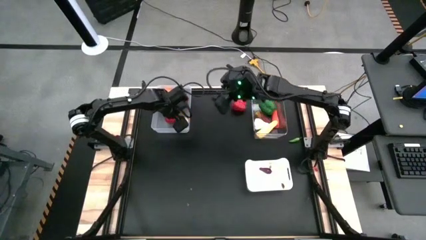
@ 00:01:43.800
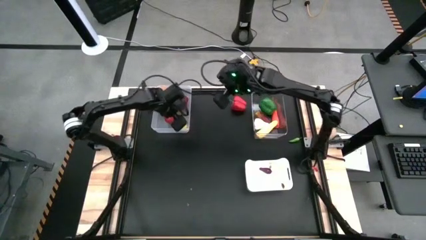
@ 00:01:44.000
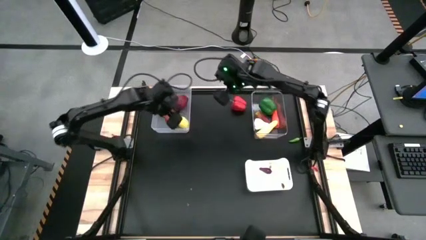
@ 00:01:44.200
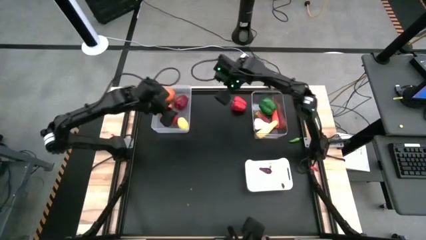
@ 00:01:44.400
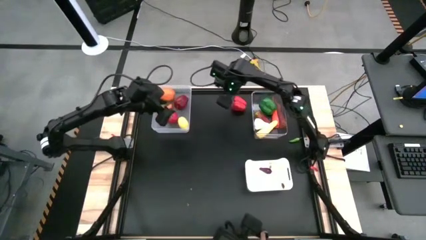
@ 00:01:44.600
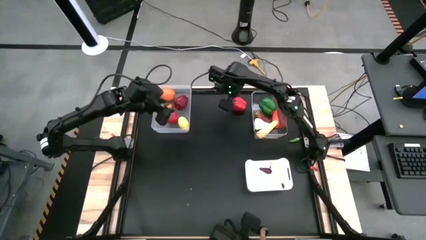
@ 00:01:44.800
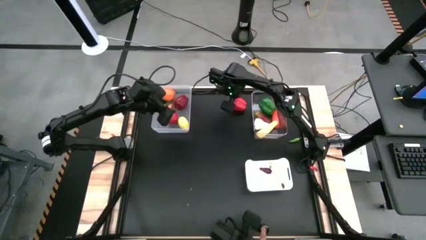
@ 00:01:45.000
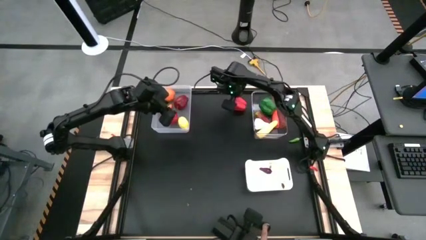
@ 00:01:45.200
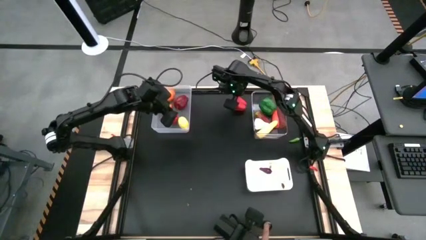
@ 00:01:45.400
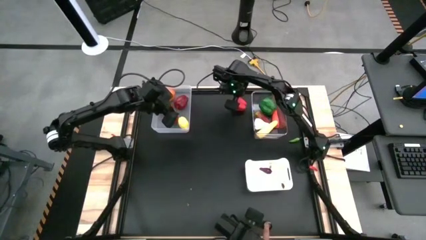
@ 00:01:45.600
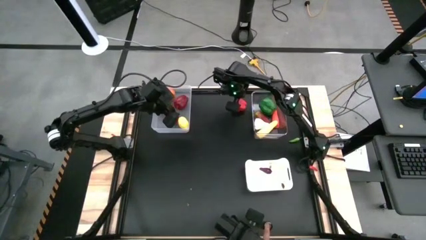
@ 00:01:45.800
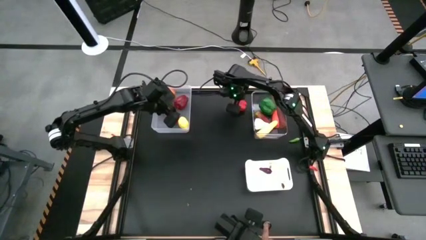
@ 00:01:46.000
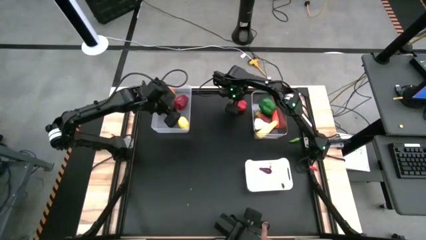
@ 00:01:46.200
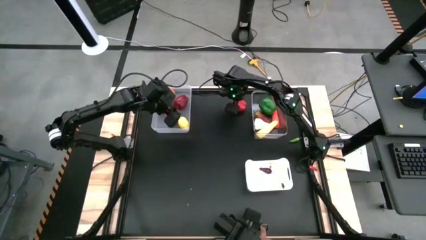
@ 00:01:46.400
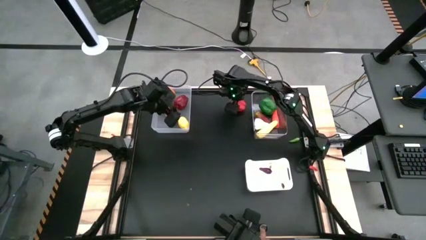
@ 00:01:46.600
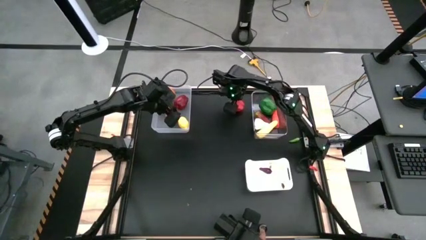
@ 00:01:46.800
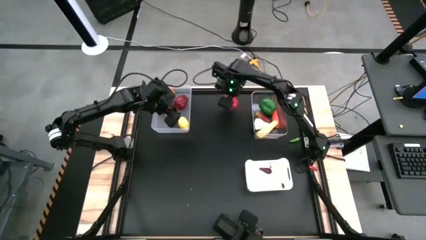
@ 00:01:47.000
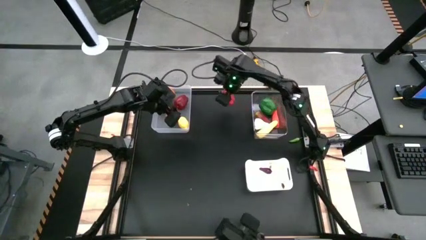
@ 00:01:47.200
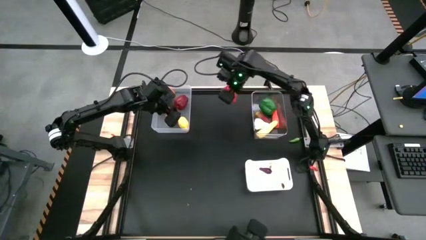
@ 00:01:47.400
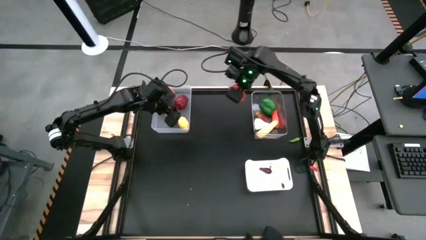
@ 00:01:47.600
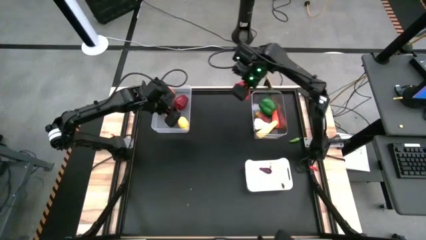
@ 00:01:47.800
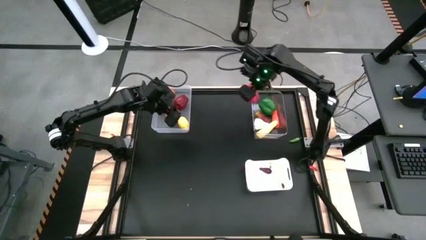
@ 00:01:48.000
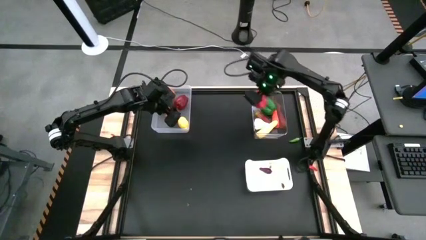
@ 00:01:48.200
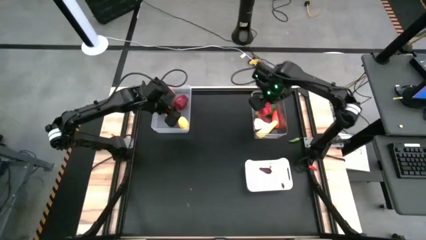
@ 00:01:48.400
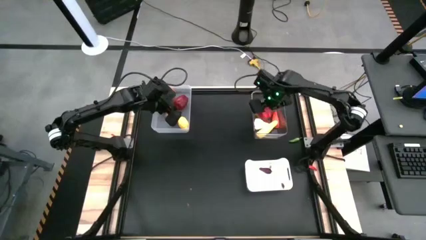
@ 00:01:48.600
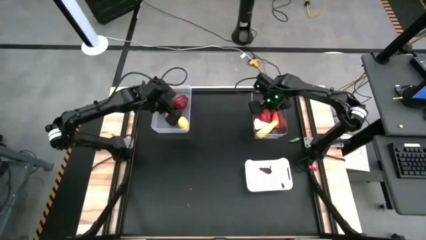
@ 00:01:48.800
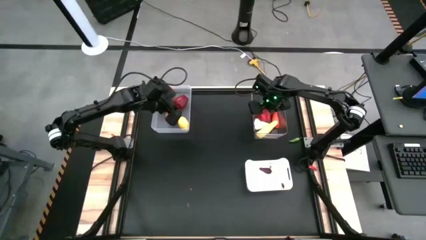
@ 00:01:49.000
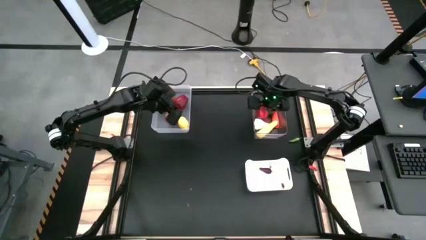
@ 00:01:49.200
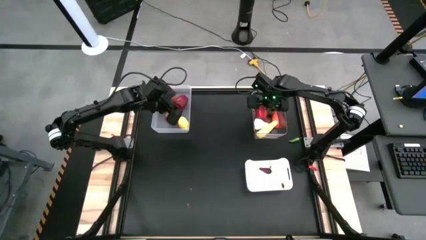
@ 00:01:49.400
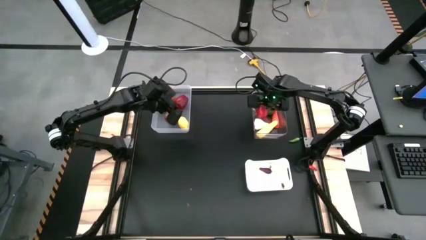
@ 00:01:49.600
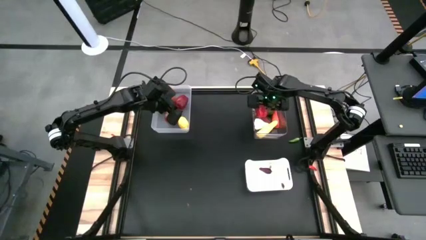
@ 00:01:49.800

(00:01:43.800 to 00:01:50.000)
Task: Sort produce into baskets
Put the red bell pepper into the transparent bin

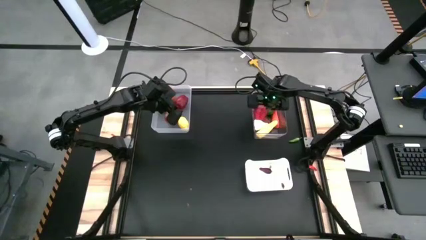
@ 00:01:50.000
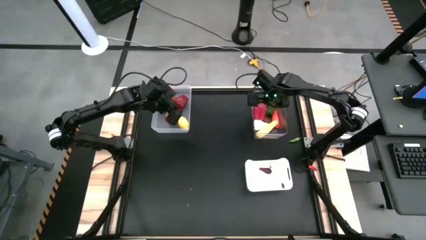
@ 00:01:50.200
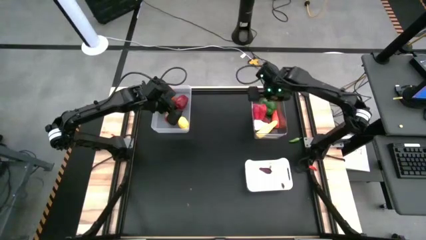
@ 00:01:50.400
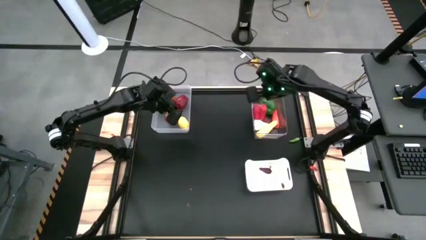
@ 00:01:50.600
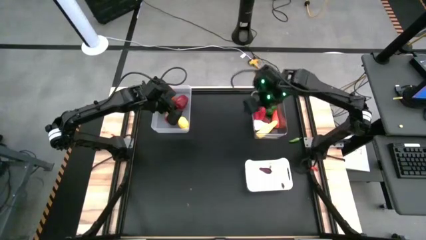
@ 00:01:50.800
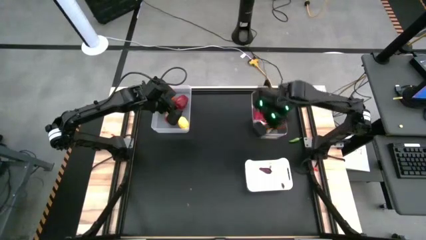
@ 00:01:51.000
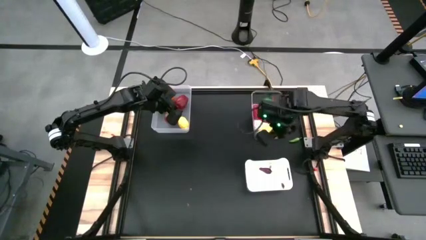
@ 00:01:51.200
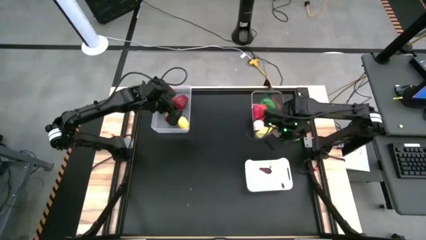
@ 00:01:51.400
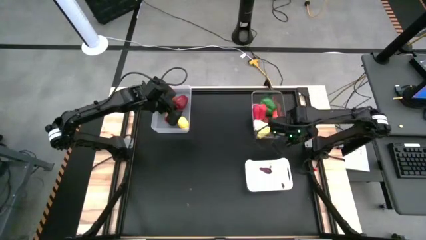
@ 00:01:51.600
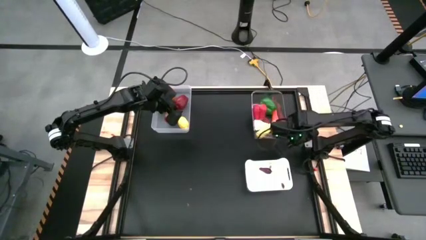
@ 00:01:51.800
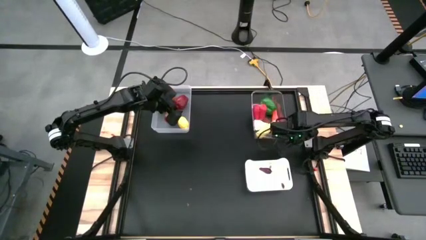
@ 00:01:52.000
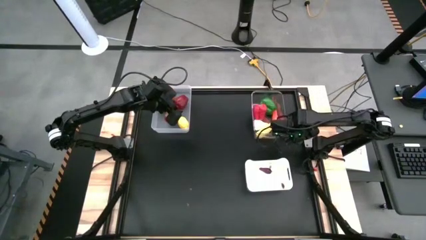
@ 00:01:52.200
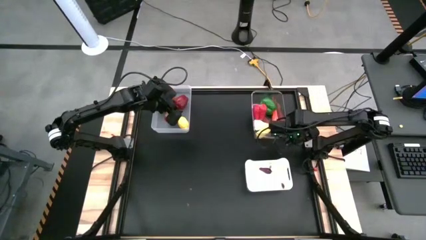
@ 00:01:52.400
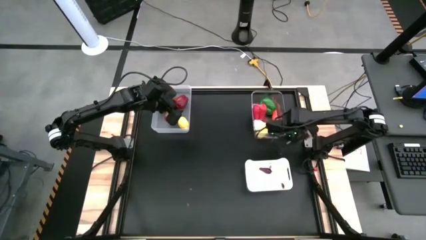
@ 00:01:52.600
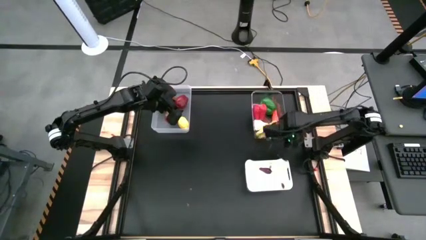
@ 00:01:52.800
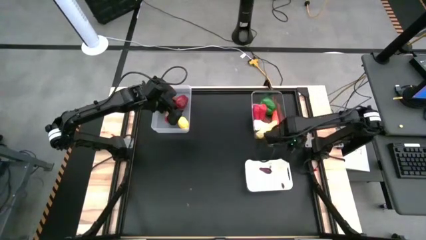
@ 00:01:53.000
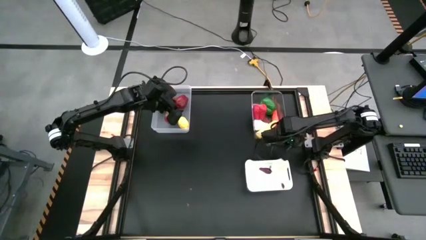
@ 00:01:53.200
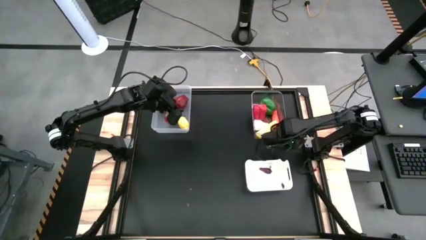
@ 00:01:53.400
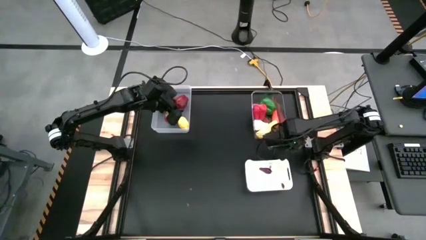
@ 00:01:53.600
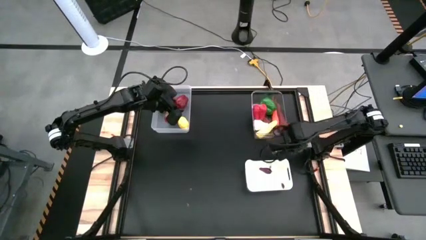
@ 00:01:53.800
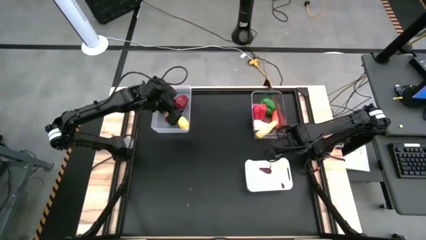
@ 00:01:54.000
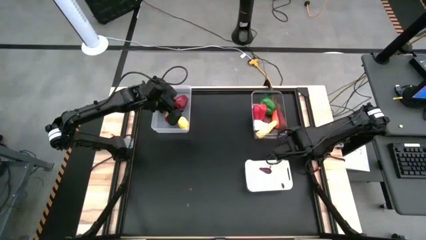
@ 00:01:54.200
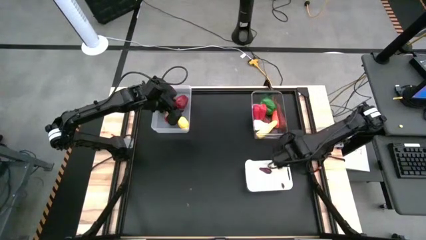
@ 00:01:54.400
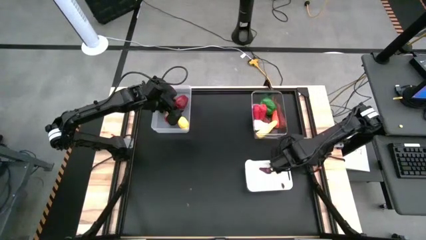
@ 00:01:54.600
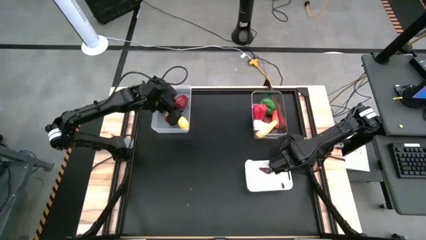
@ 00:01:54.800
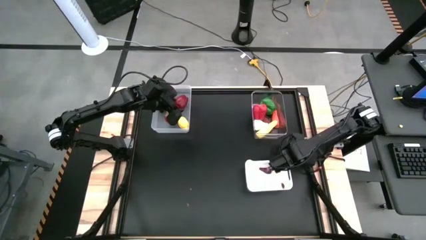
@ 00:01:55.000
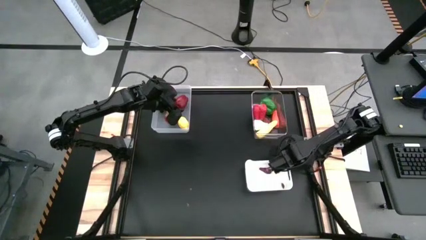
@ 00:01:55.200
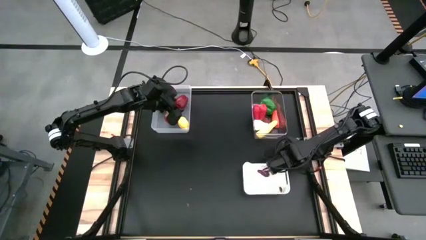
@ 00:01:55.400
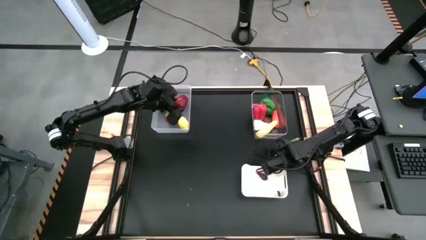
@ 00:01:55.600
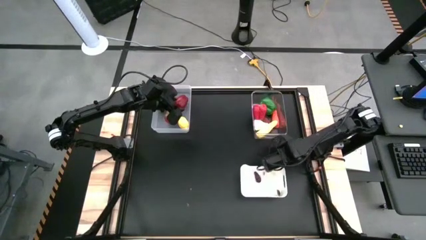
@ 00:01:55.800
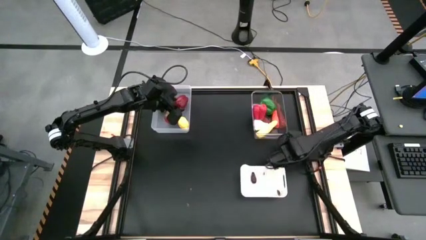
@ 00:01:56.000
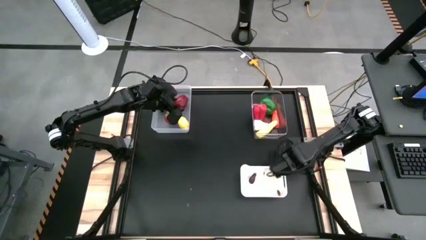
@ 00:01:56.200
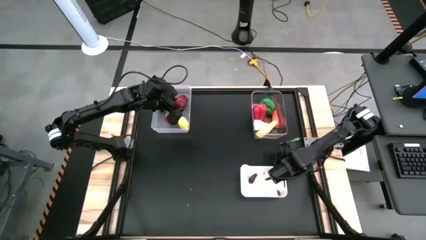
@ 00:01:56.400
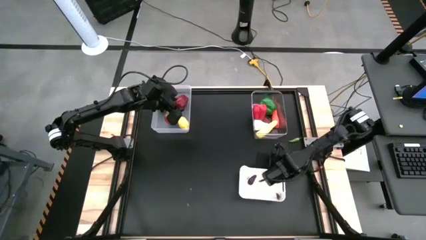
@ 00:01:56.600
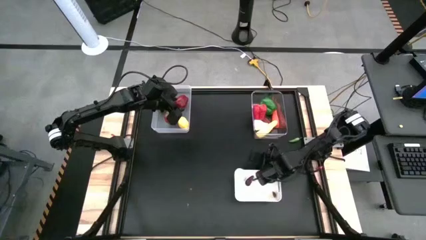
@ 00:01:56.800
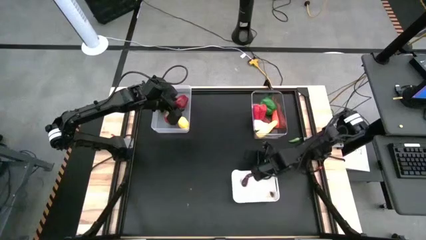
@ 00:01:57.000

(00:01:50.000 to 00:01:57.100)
Adjust the white bin on the table

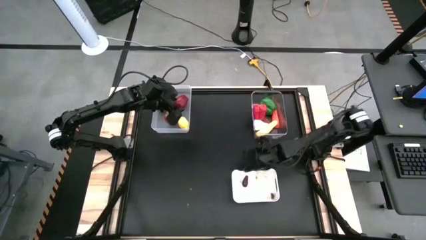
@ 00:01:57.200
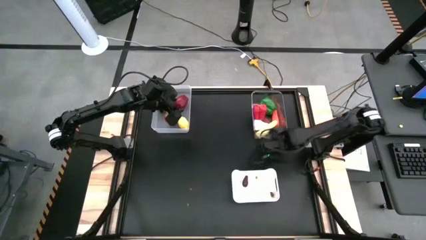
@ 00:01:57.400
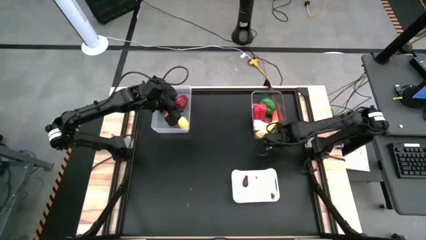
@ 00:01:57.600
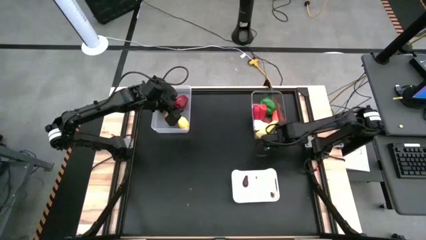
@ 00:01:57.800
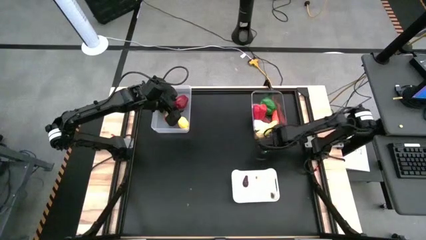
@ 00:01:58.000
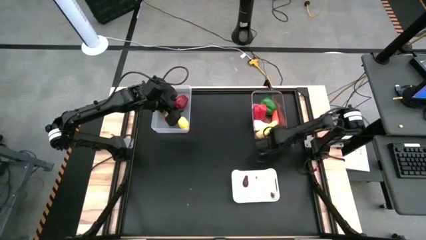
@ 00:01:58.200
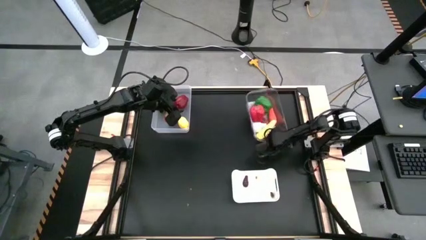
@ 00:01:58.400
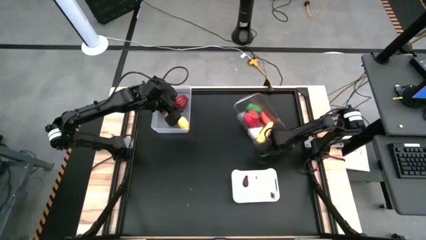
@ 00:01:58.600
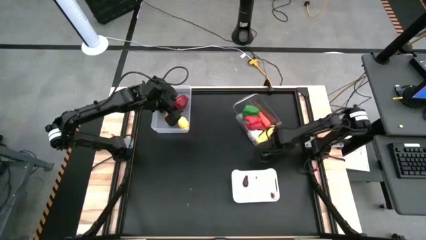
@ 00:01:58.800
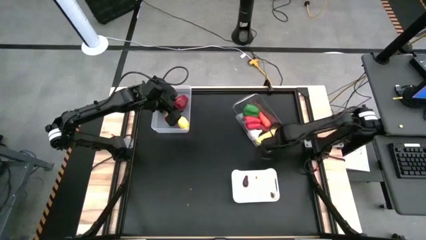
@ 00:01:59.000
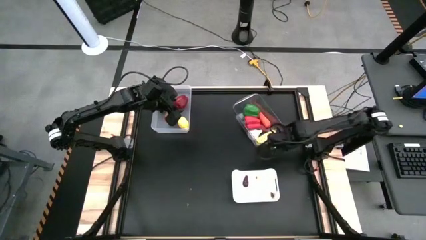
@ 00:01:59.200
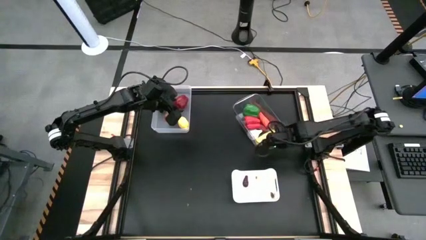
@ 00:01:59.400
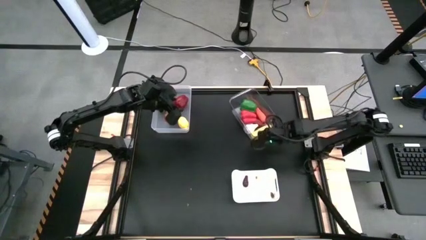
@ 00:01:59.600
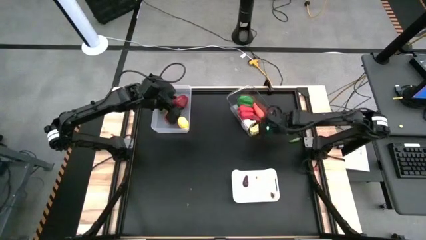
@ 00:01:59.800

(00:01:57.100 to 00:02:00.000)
Adjust the transparent bin on the table

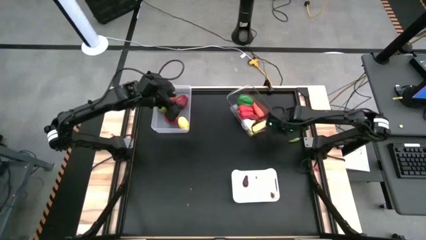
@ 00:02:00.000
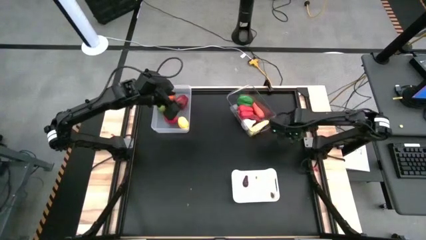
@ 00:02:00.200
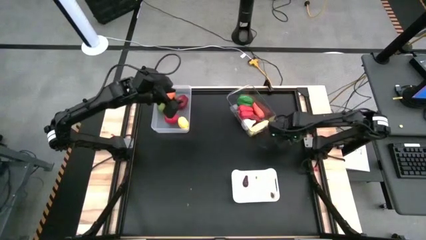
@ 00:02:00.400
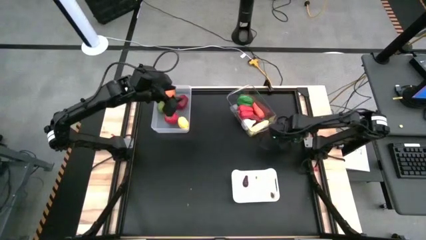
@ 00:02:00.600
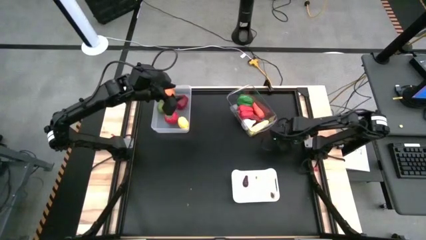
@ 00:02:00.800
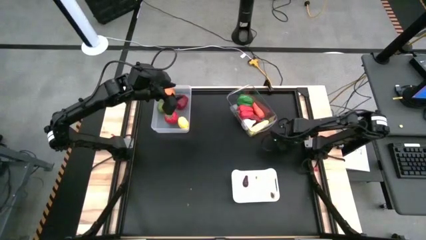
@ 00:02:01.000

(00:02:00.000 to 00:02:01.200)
Put the green chili pepper into the white bin
